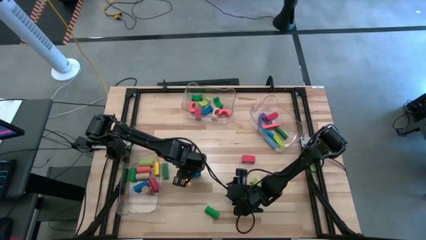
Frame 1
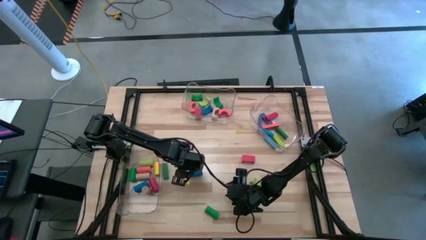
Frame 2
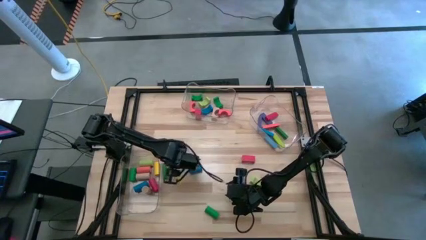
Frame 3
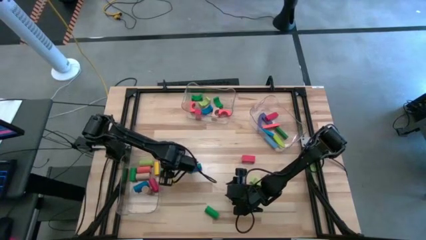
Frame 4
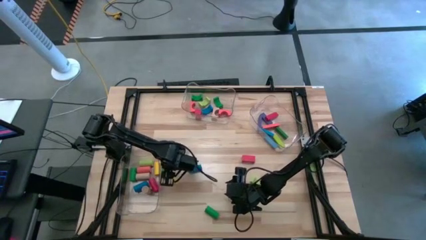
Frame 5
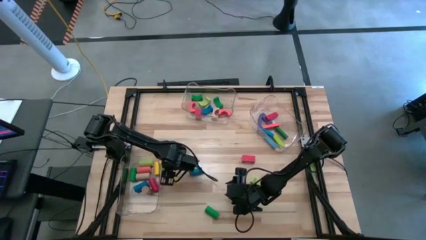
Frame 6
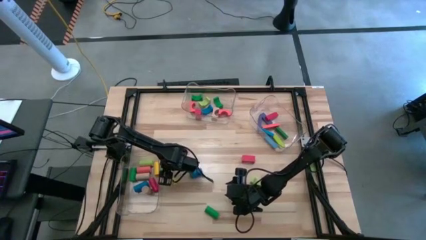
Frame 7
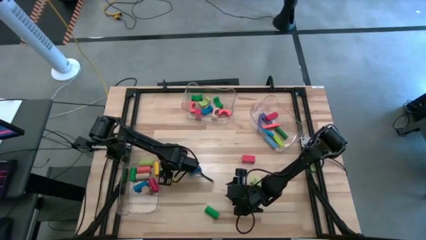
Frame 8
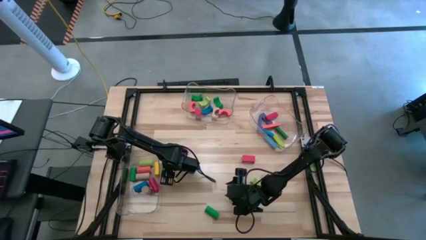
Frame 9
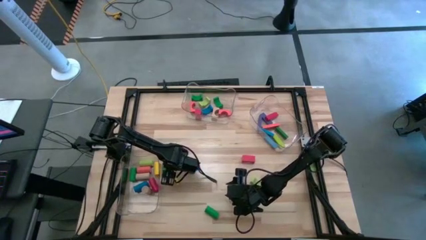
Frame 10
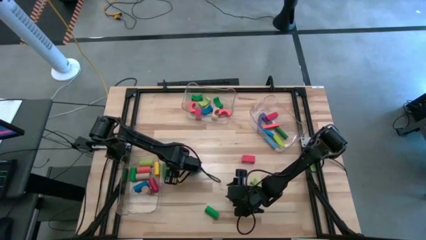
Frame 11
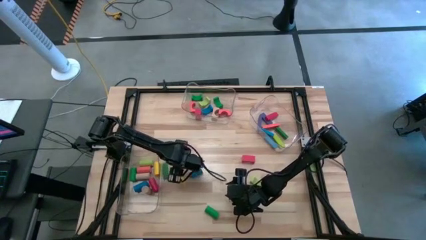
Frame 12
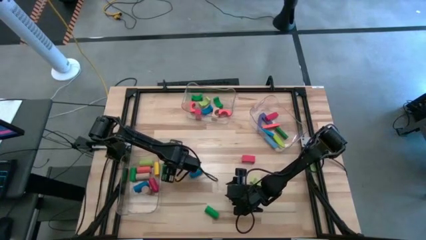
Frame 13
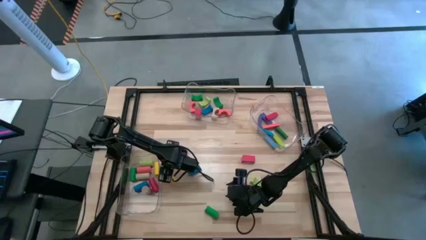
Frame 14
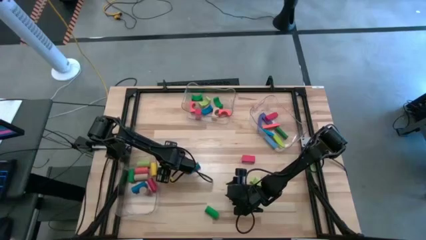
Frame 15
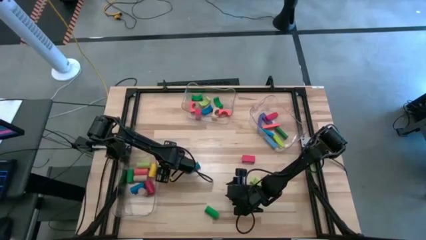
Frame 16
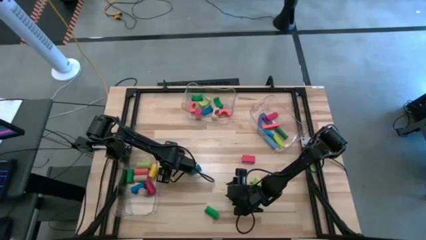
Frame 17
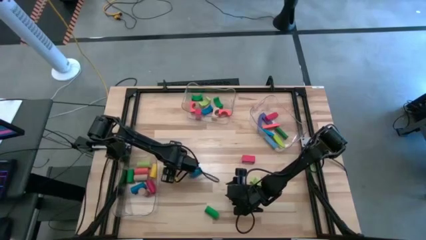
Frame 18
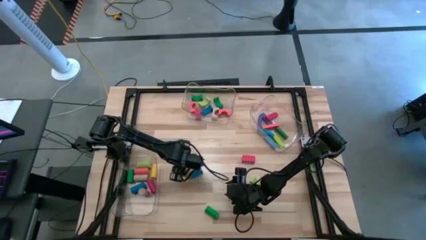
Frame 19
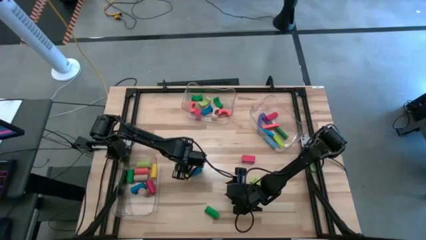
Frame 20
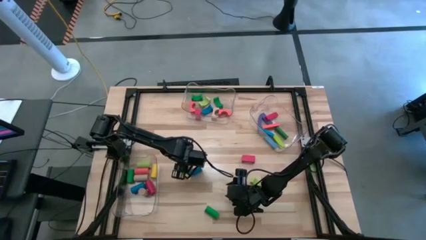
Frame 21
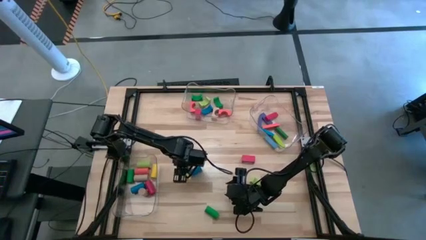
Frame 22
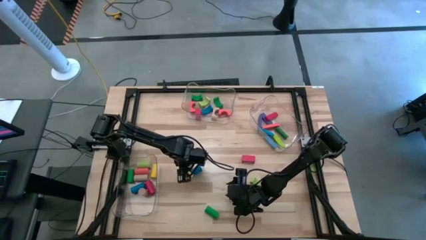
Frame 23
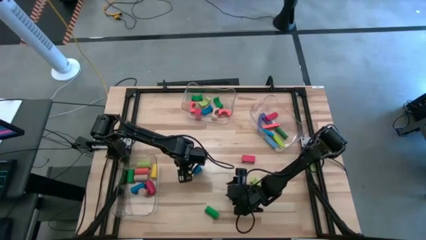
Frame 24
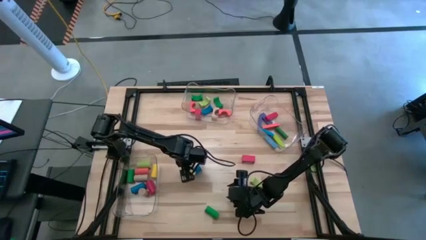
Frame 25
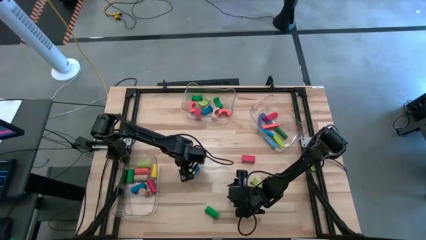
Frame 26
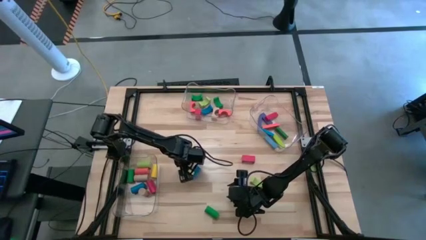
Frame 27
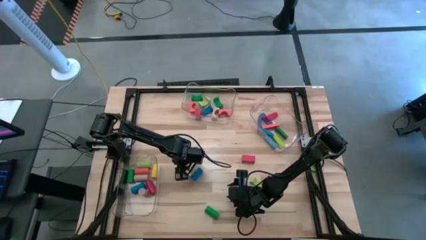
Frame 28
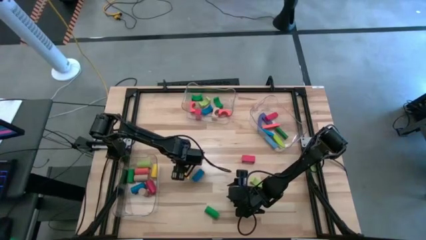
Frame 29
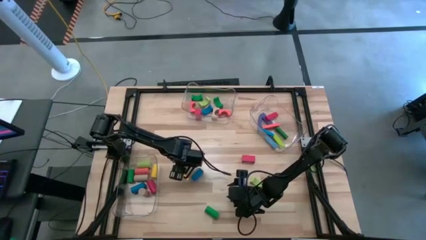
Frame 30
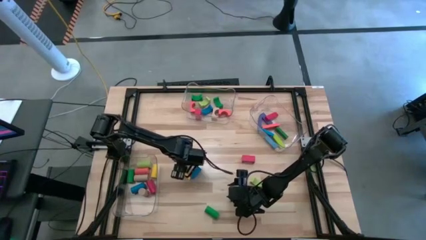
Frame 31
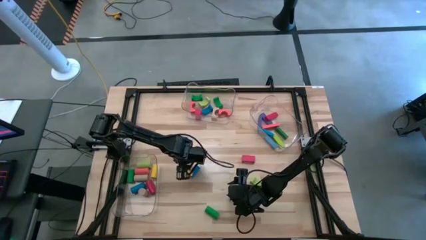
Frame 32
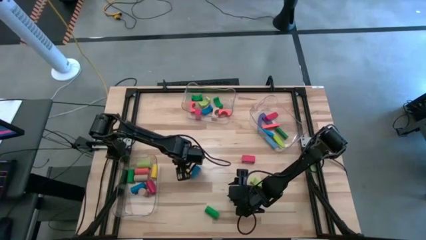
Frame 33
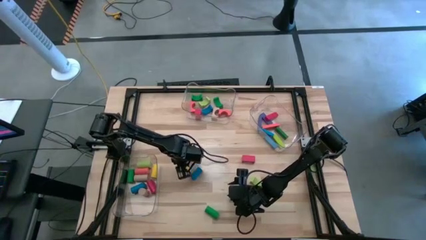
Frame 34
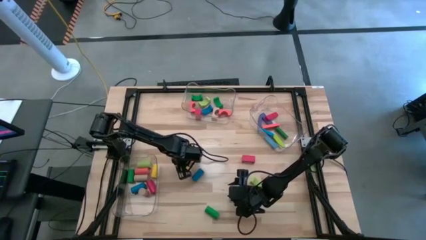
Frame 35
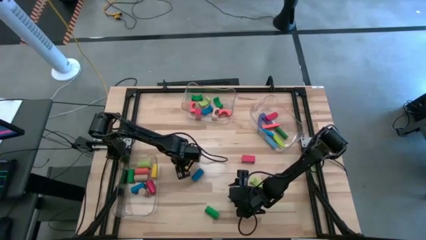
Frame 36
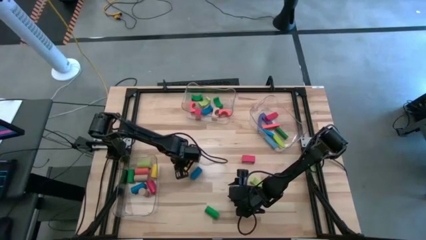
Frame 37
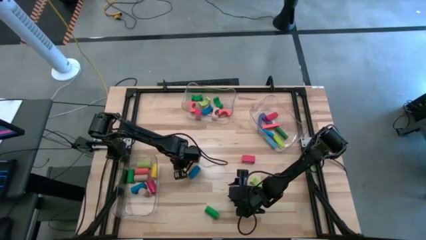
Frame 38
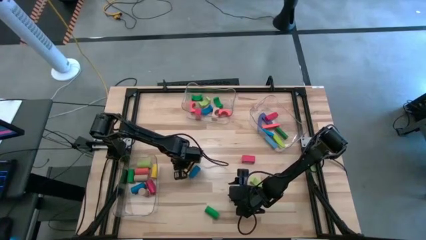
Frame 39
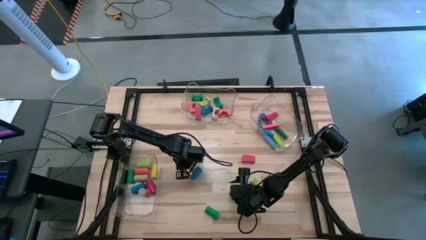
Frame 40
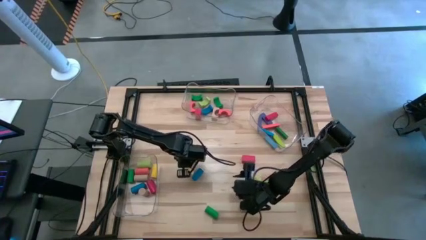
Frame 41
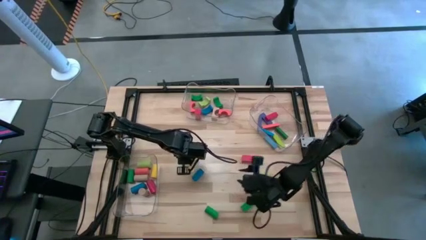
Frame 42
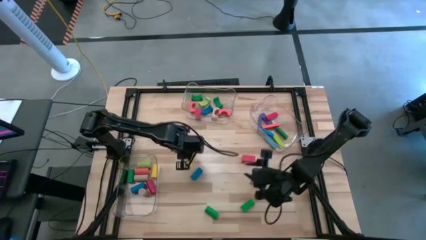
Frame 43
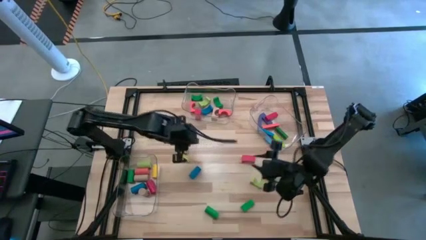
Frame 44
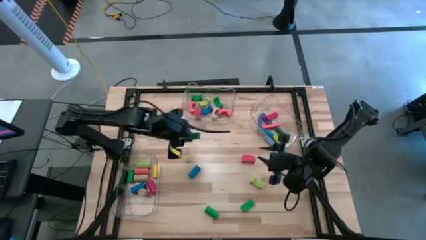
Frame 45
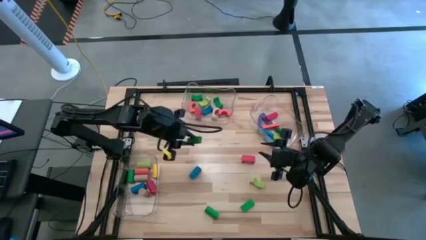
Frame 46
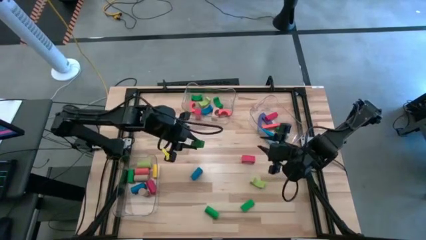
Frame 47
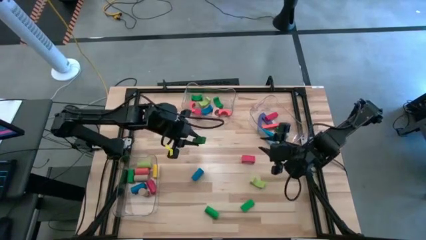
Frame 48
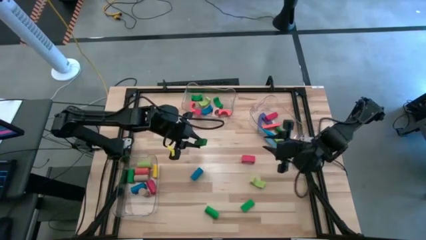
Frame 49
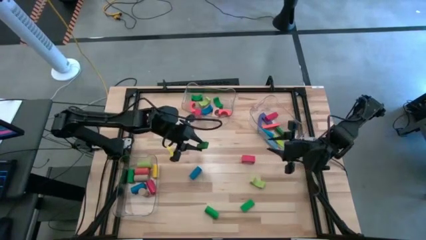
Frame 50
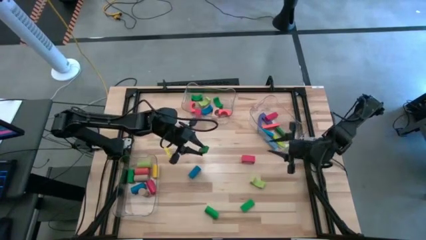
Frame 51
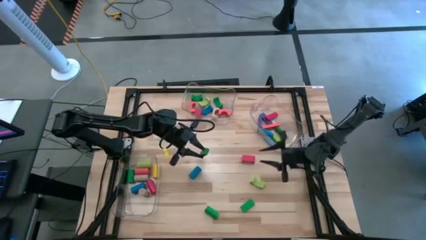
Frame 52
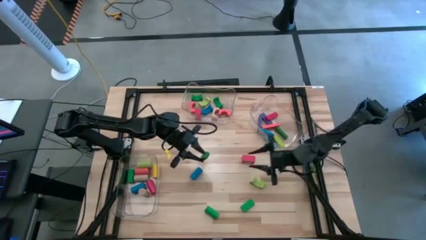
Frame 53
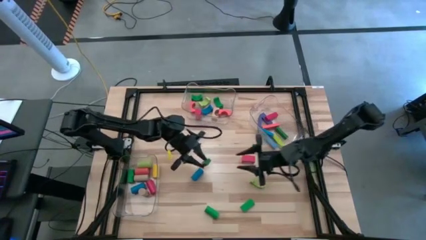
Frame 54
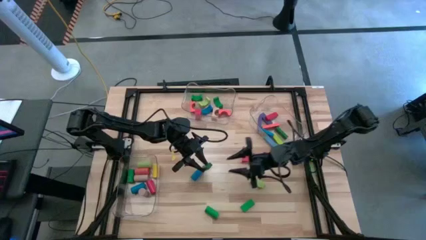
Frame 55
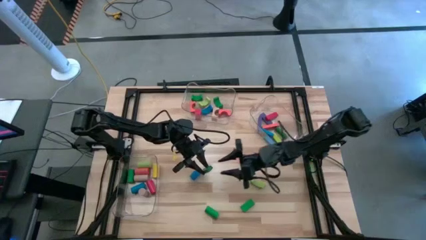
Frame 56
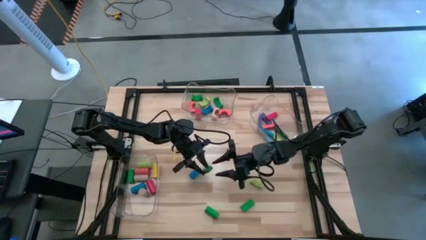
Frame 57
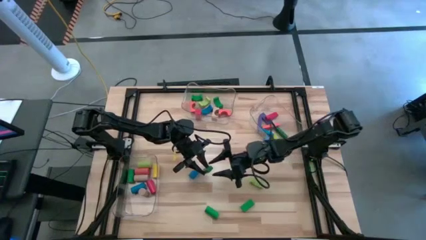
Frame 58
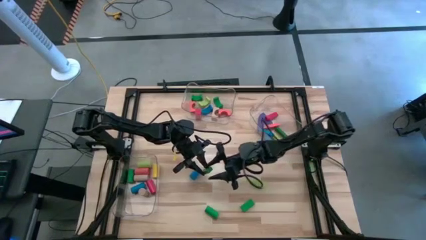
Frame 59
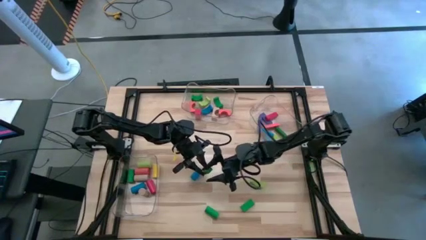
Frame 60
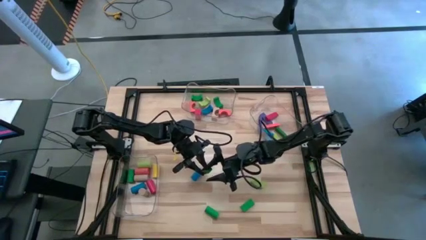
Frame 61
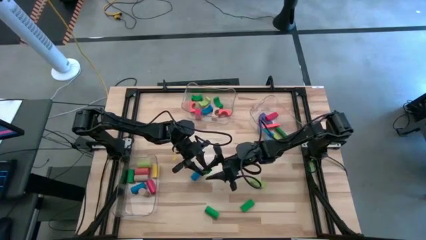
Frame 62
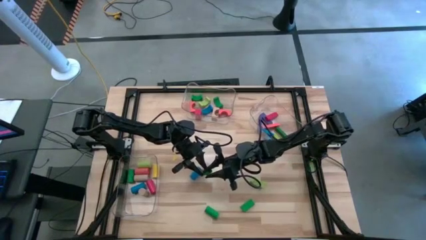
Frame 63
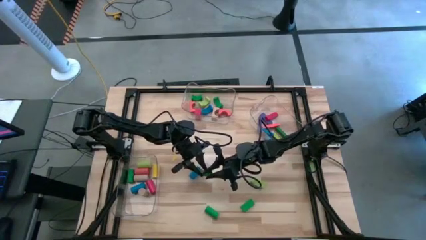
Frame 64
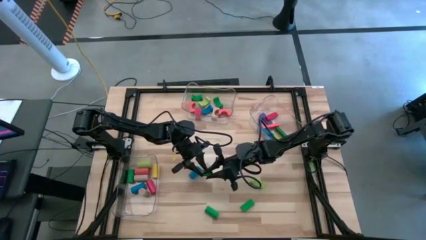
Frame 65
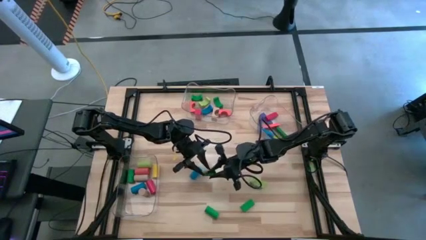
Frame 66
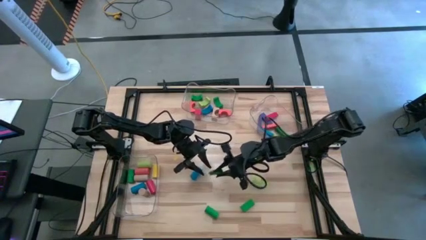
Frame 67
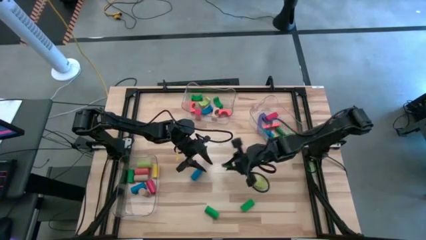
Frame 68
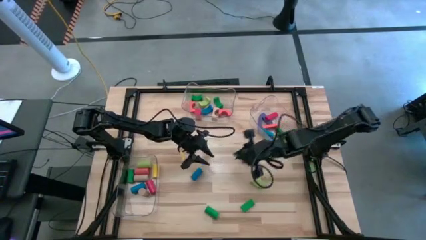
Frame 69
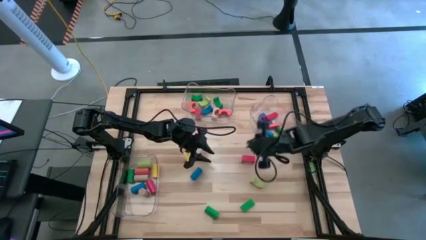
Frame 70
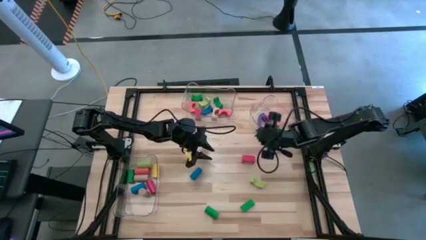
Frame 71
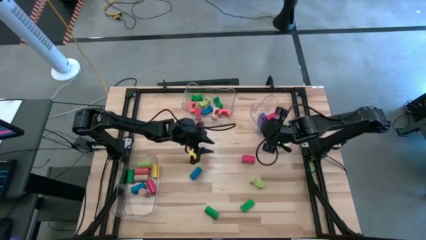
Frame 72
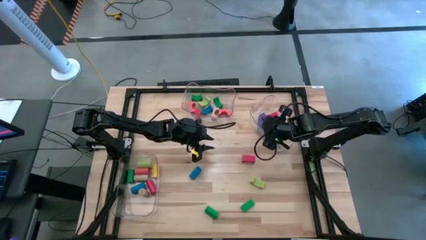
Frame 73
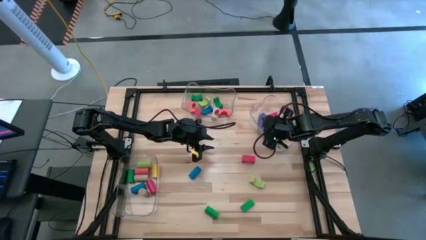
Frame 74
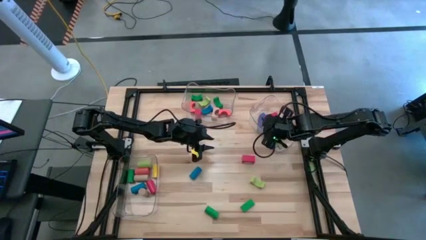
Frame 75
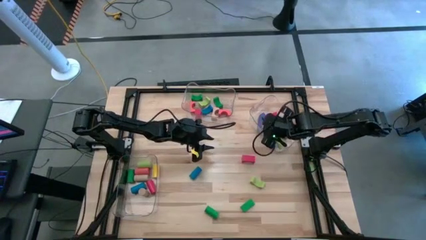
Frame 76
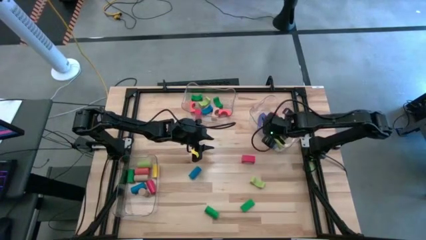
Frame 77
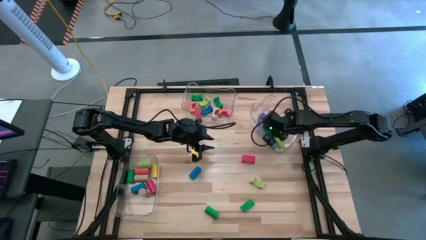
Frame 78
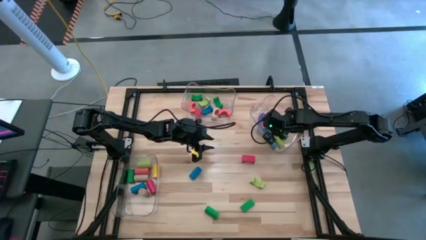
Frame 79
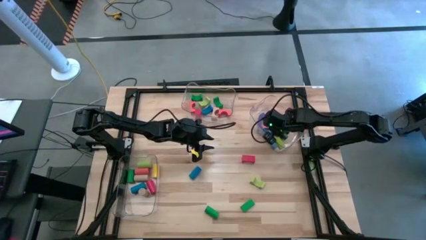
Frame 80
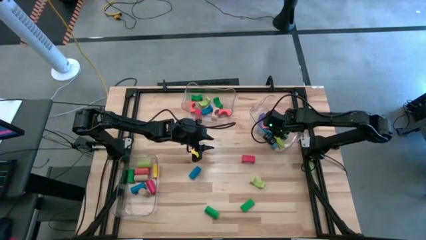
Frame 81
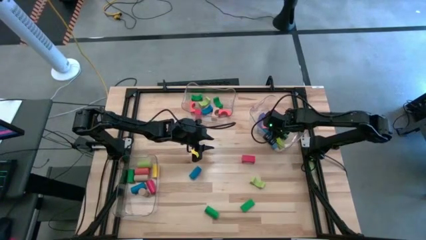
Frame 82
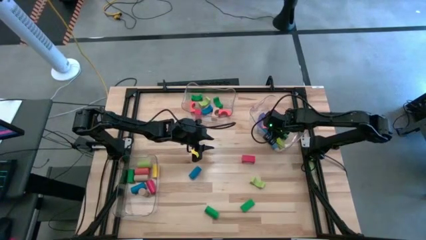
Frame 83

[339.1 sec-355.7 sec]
Task: Sort blocks by size
Put the green rectangular block into the right transparent bin
